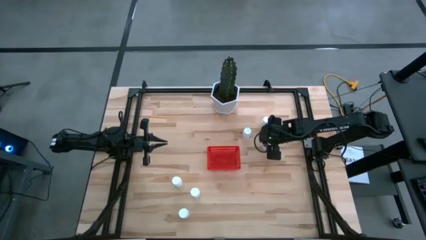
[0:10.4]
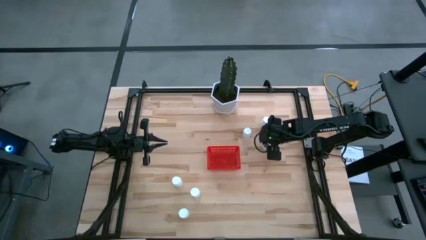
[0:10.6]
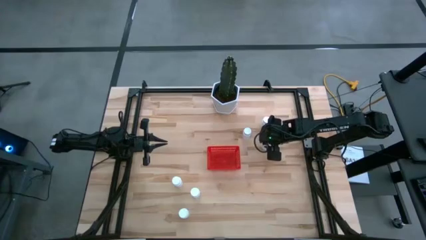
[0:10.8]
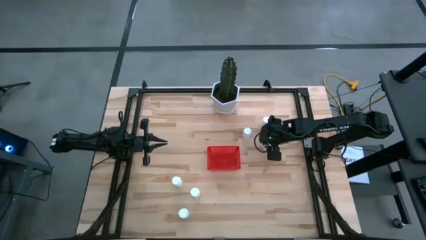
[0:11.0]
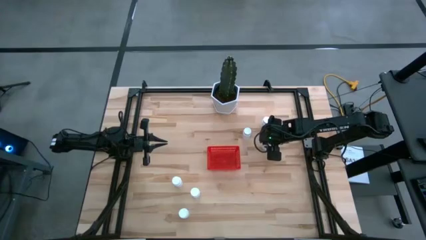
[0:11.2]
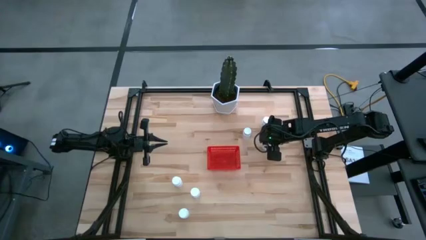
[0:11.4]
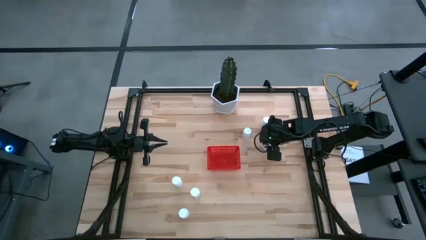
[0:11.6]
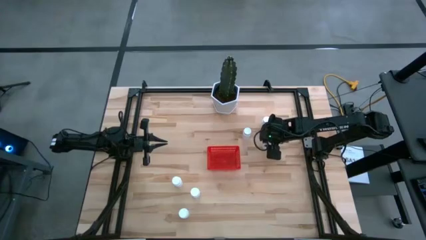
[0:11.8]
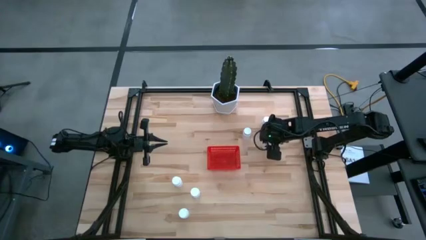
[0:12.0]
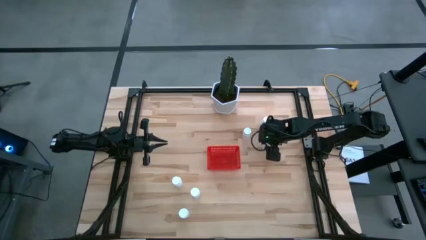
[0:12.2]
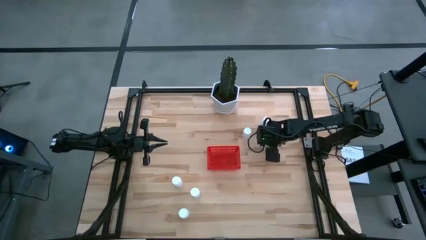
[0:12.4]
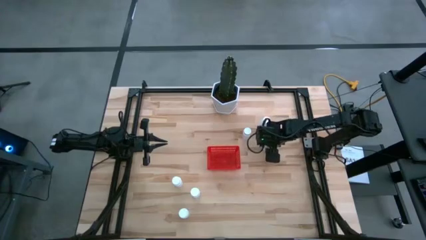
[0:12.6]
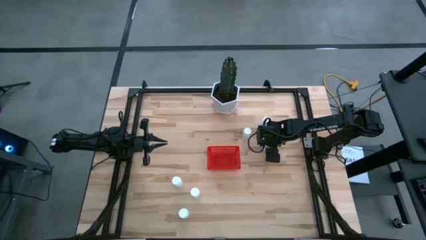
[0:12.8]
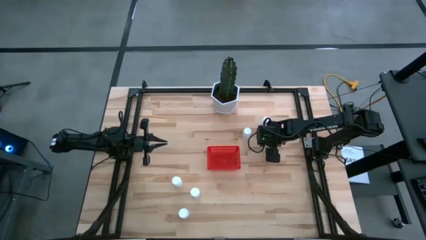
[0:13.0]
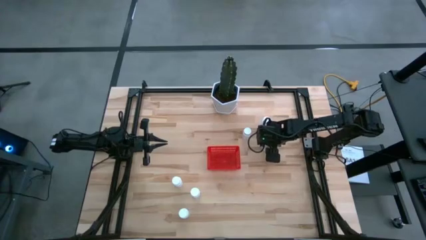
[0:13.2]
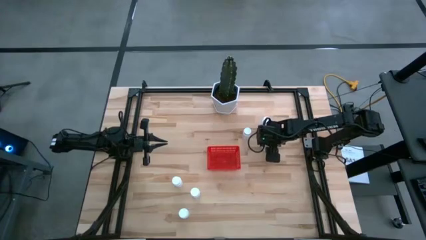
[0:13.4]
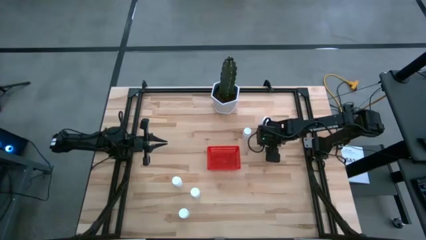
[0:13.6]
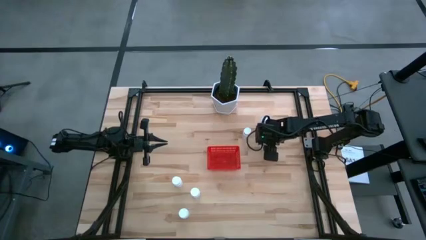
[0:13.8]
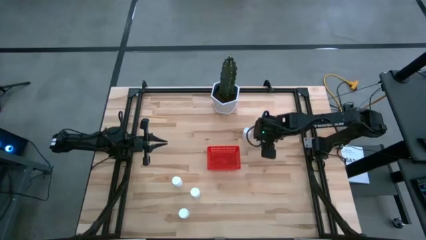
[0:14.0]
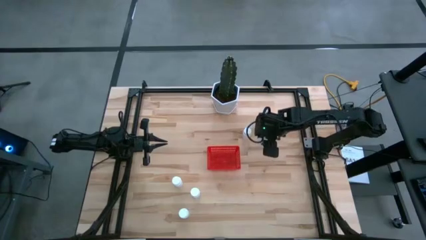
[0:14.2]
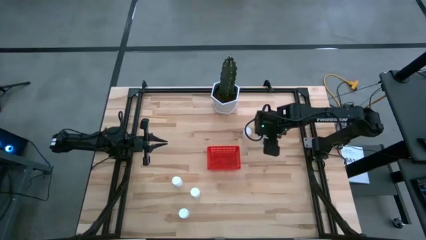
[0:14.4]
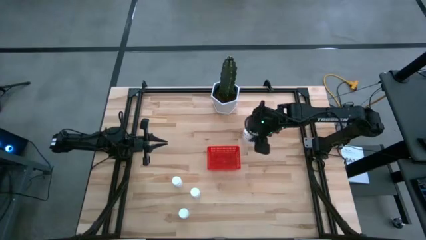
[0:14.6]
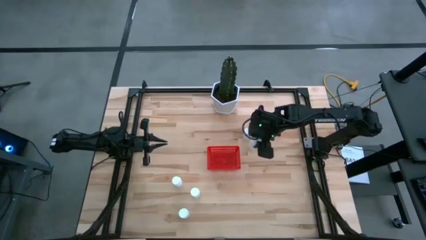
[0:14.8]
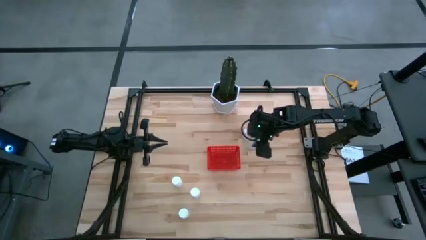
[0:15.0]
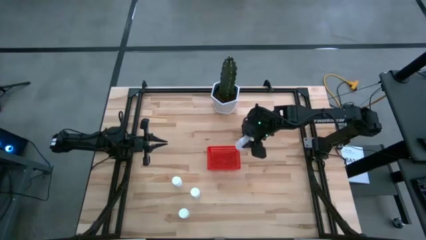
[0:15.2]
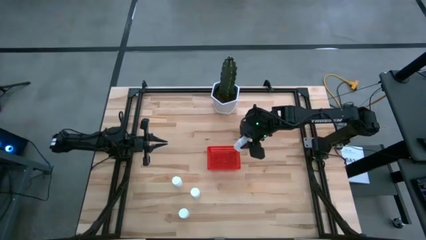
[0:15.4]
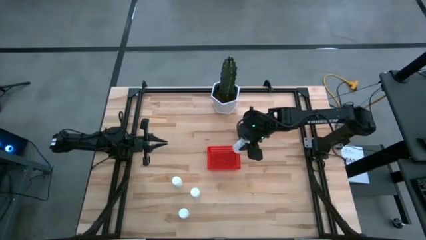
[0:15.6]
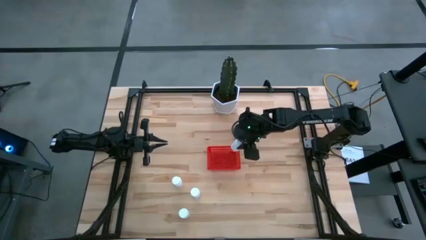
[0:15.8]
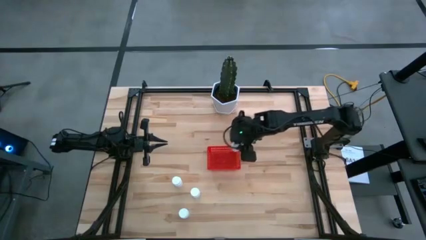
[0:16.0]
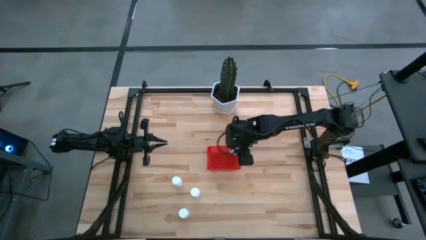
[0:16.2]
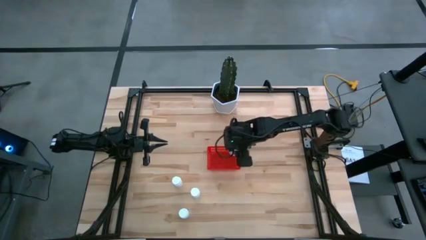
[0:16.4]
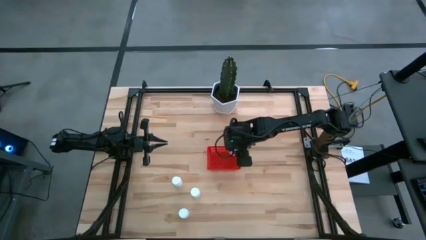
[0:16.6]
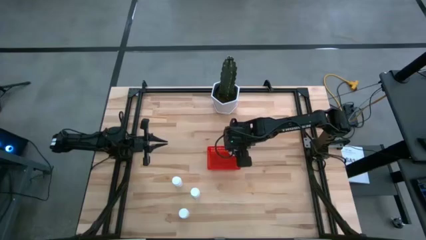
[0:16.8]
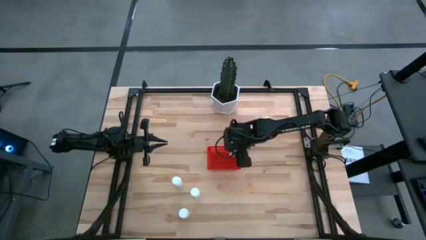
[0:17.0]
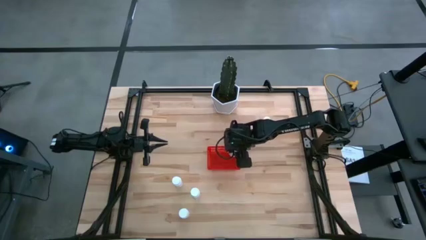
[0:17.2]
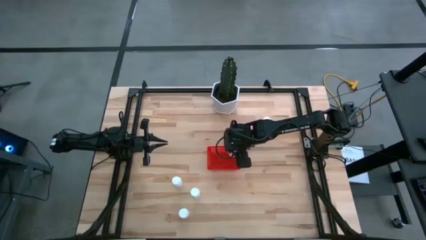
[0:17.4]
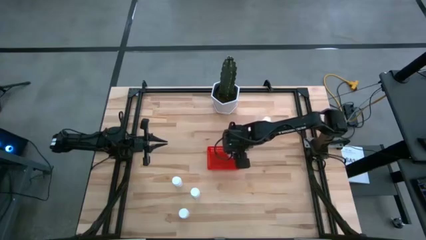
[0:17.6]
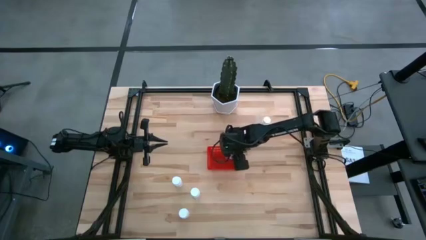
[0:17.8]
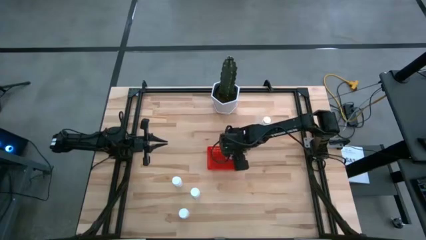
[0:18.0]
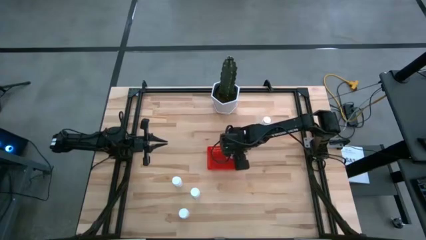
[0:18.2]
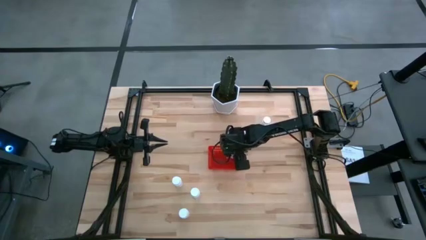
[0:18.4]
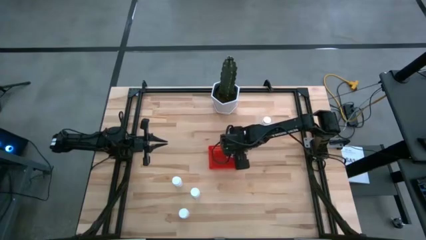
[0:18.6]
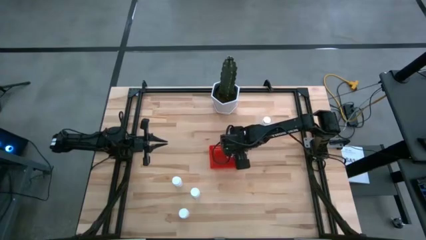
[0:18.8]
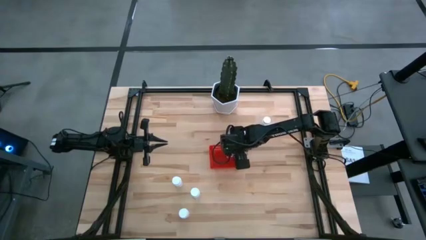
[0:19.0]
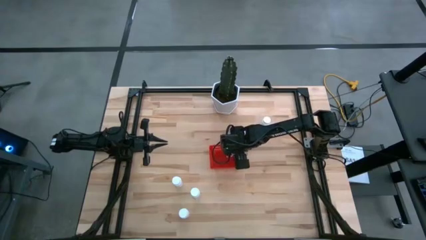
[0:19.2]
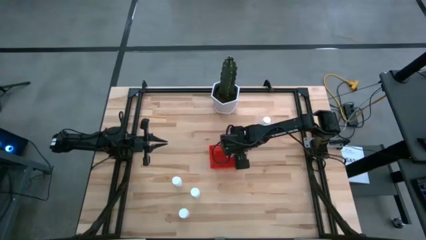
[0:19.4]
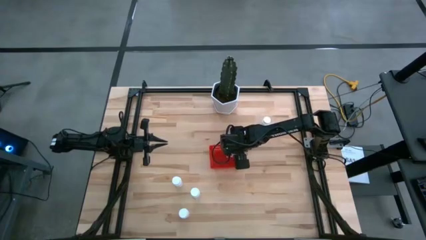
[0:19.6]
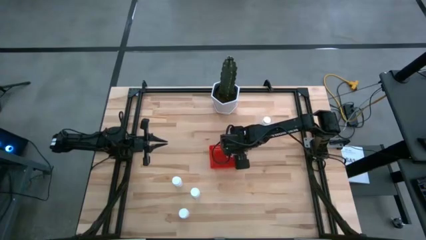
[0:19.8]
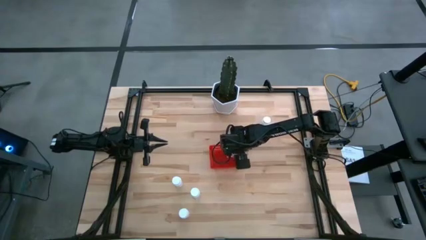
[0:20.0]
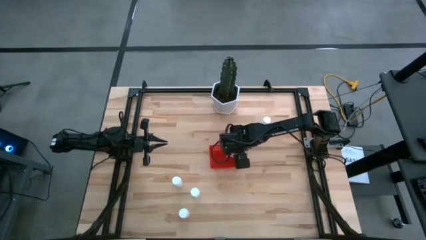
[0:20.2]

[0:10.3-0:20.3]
Task: Pick and place pill bottles into a basket
Put the white pill bottle into the red bin
